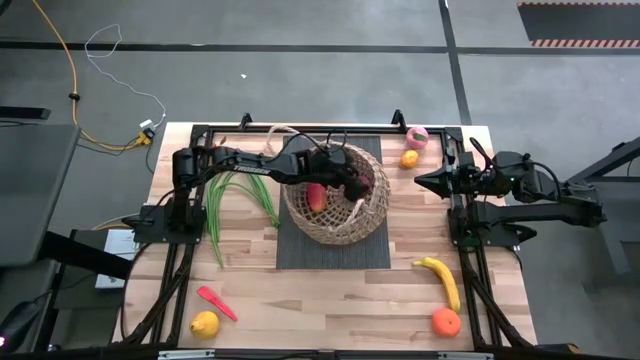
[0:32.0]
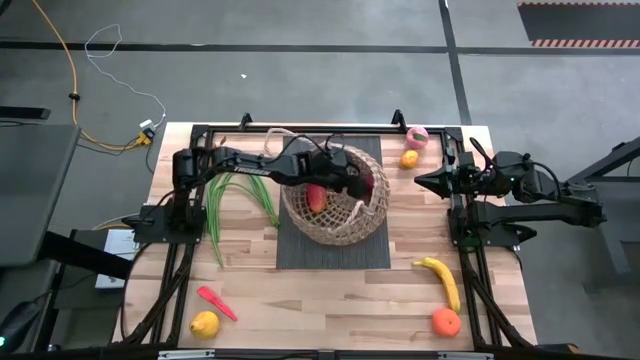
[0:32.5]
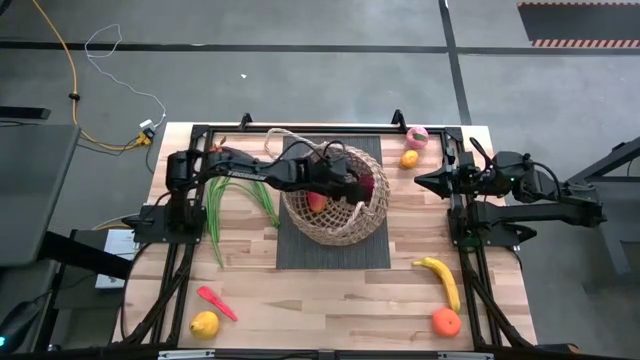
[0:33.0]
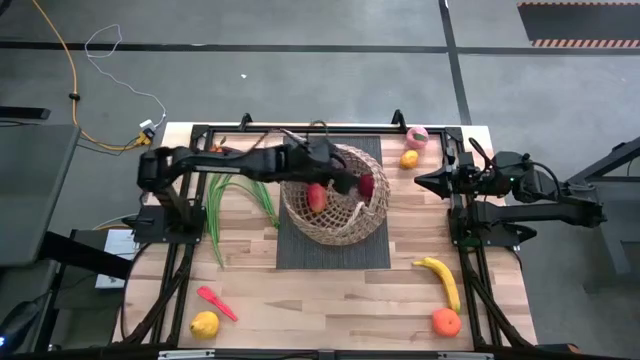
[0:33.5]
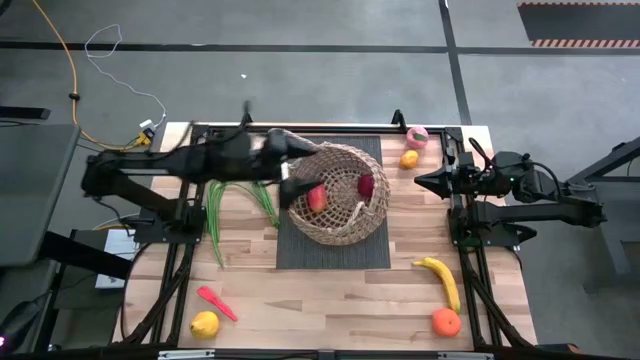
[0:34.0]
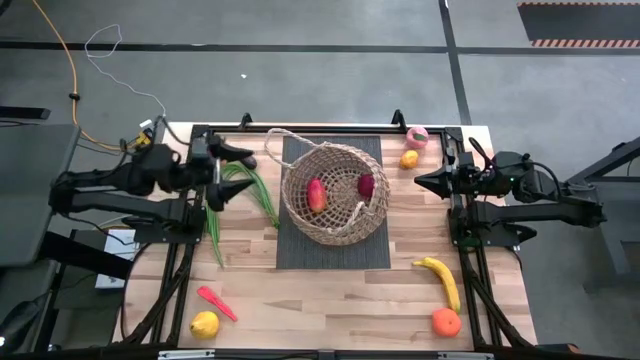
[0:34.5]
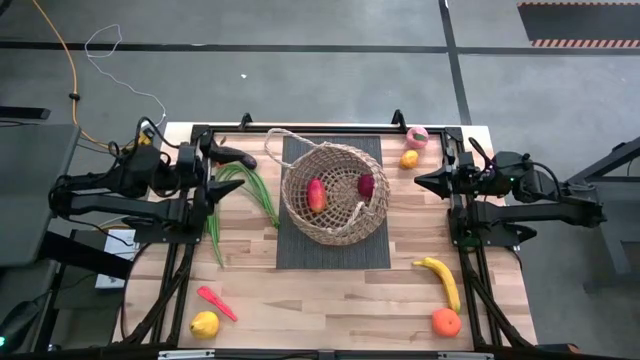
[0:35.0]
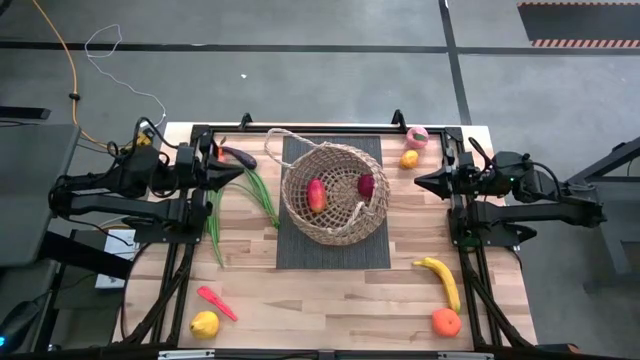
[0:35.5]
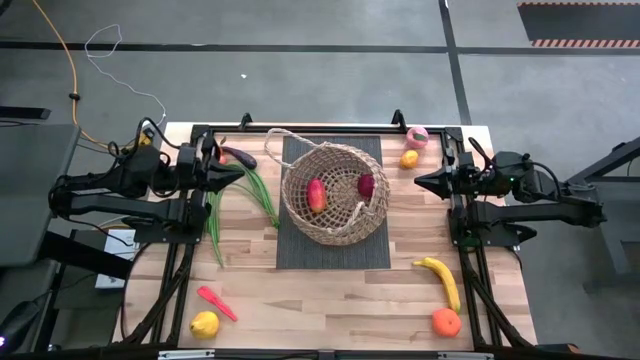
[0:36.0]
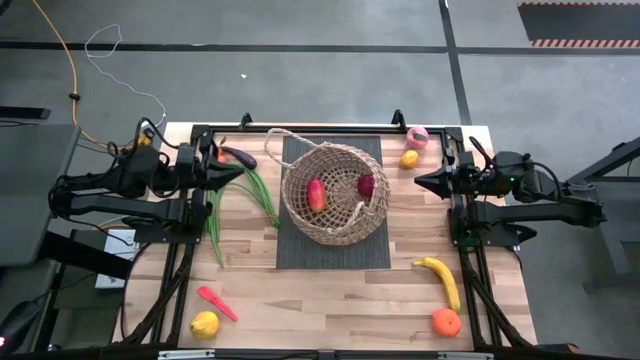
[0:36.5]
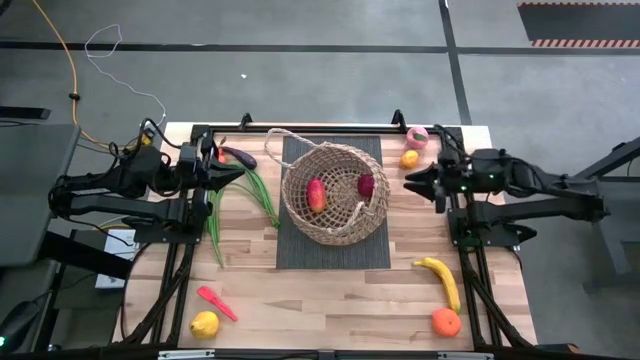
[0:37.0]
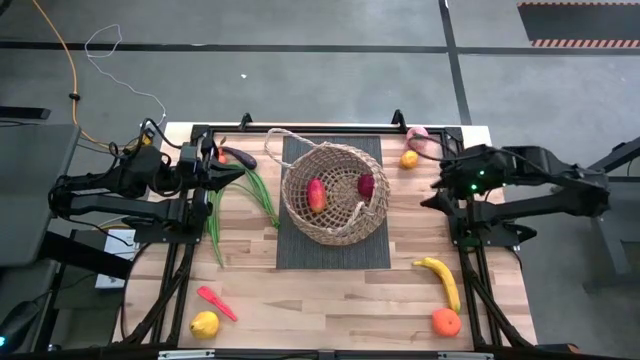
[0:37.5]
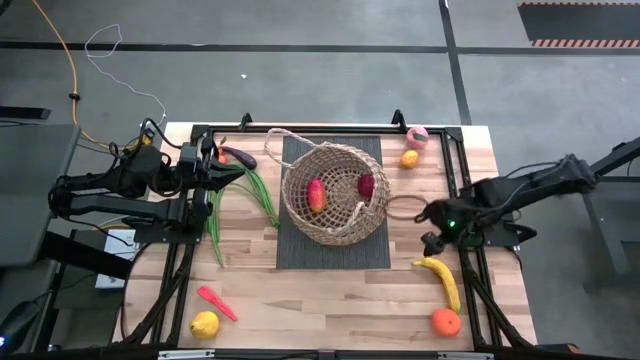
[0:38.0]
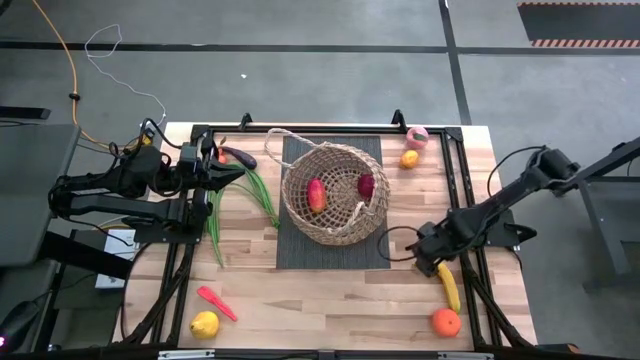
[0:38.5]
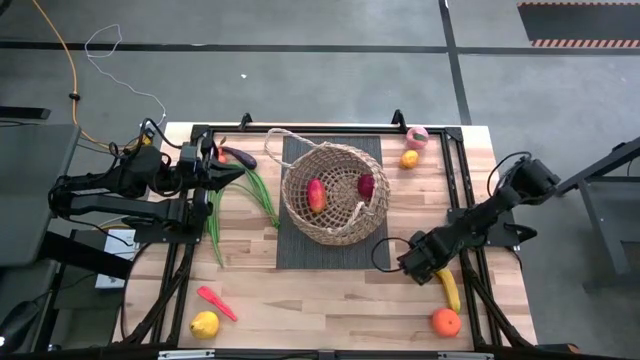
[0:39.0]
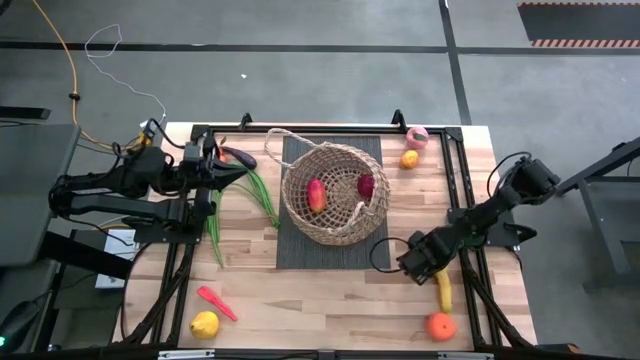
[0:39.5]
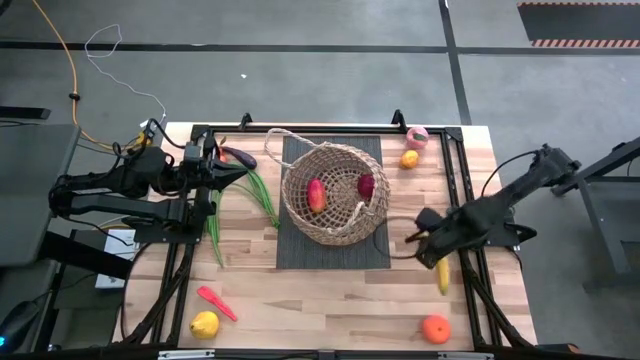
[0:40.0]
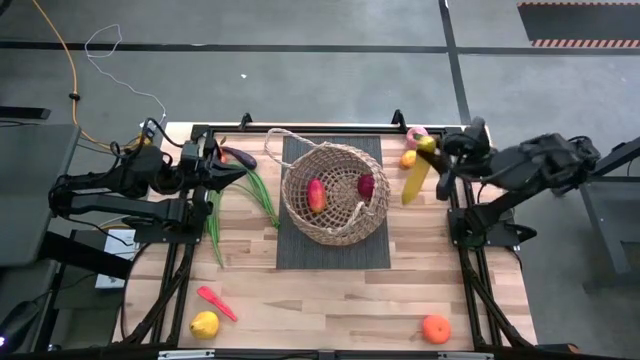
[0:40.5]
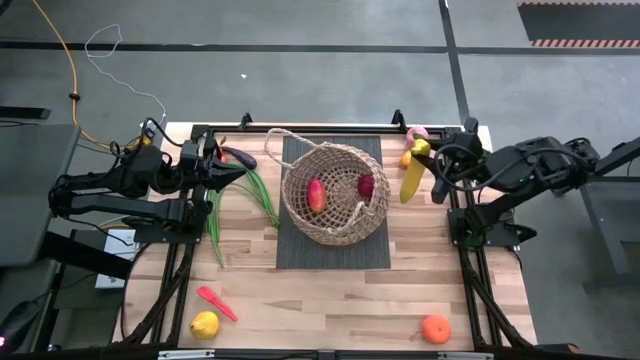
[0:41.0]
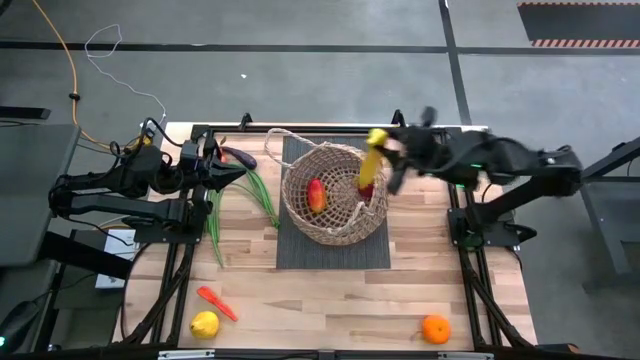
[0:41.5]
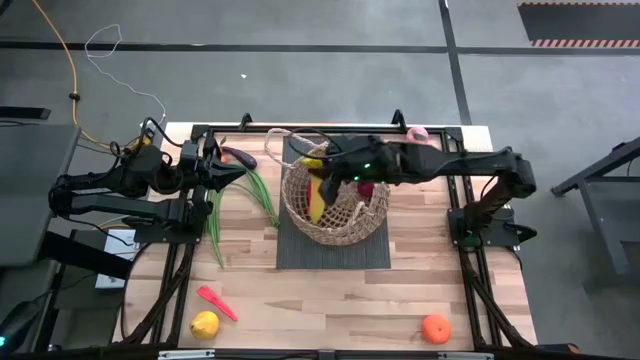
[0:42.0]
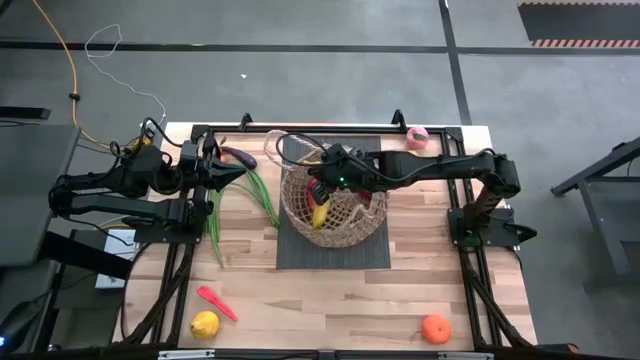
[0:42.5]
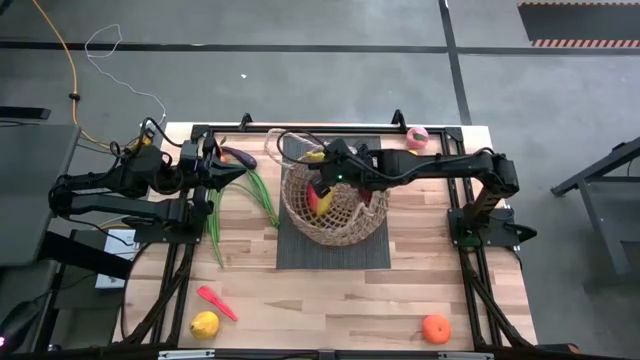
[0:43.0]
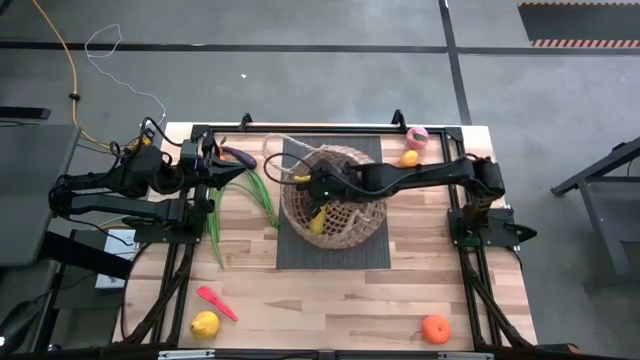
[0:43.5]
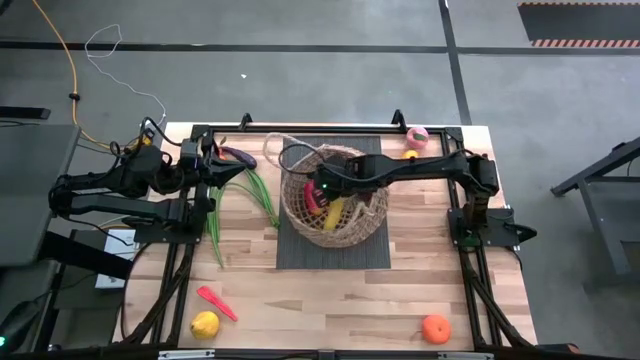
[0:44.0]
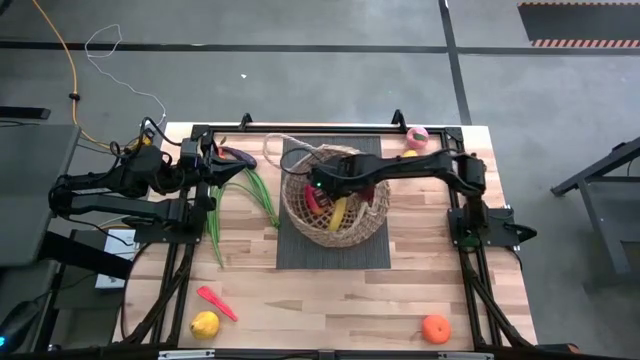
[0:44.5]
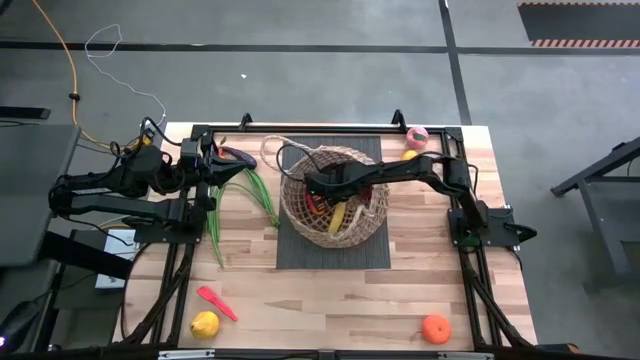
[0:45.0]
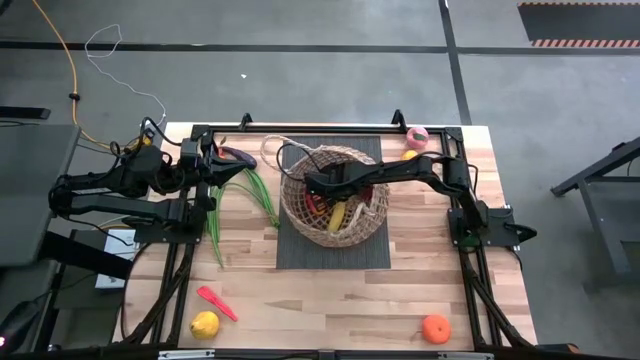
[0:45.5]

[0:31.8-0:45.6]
Task: Build produce basket
Put the banana into the woven basket

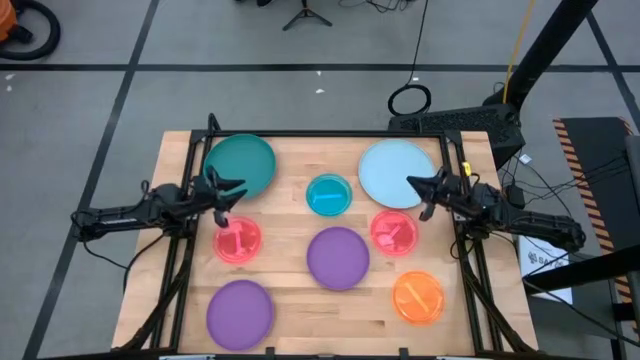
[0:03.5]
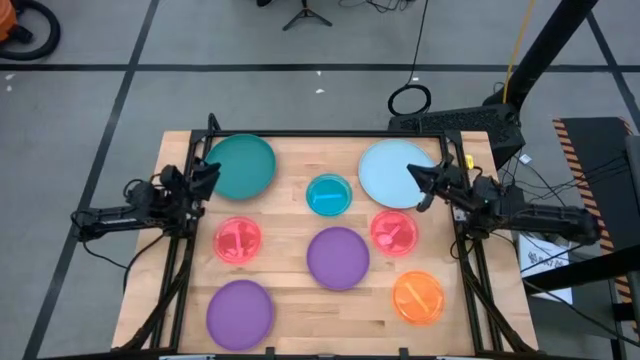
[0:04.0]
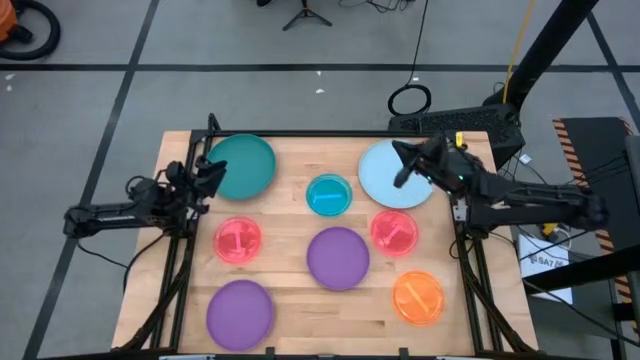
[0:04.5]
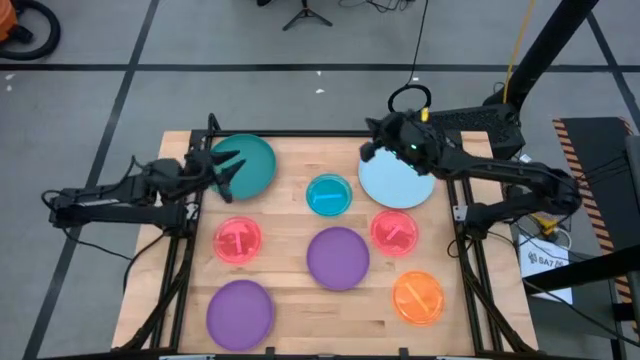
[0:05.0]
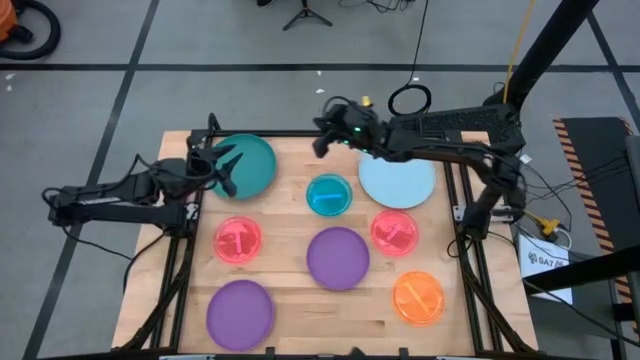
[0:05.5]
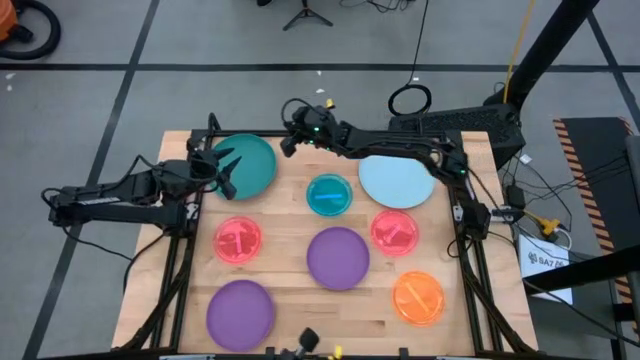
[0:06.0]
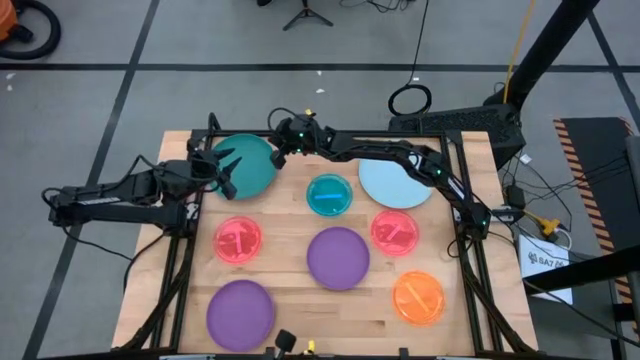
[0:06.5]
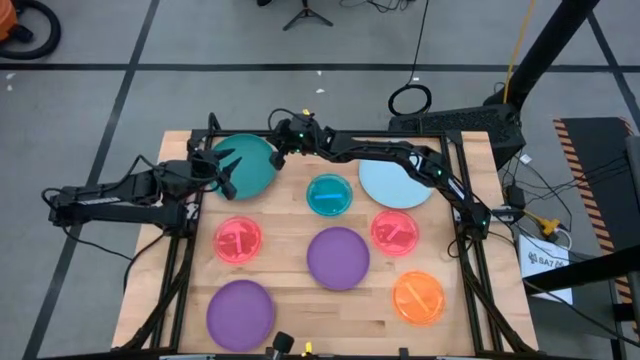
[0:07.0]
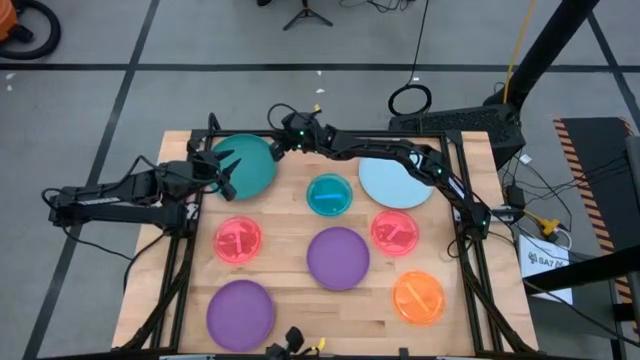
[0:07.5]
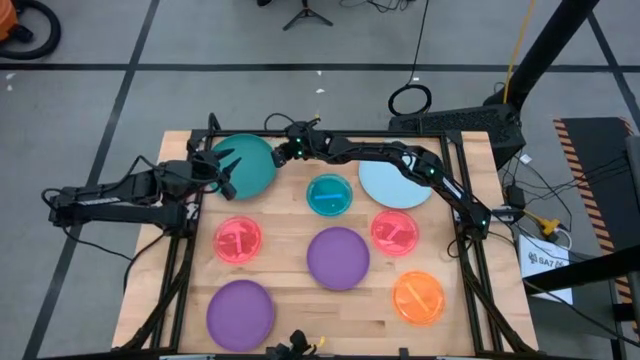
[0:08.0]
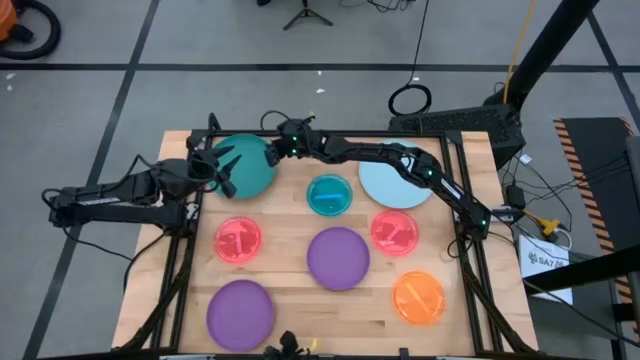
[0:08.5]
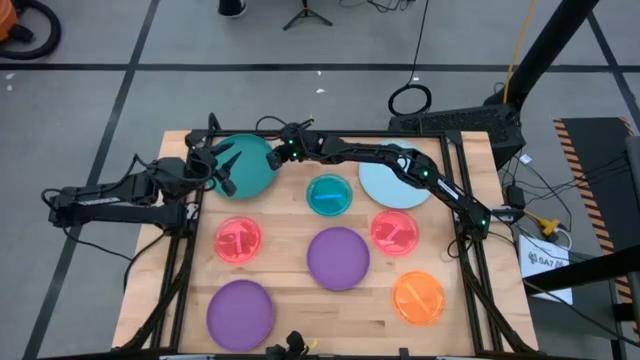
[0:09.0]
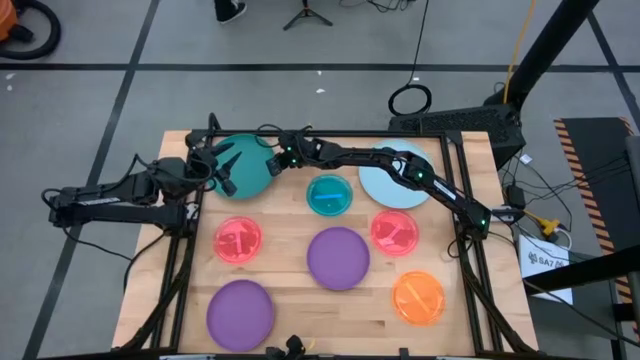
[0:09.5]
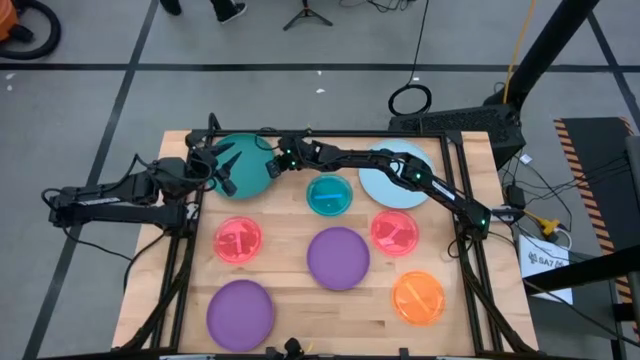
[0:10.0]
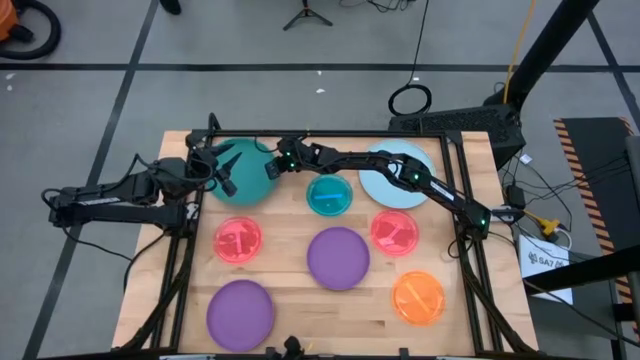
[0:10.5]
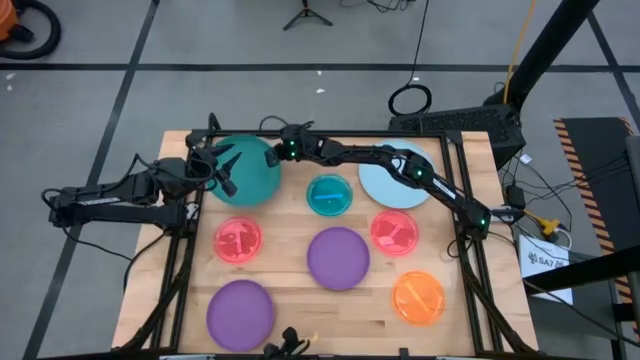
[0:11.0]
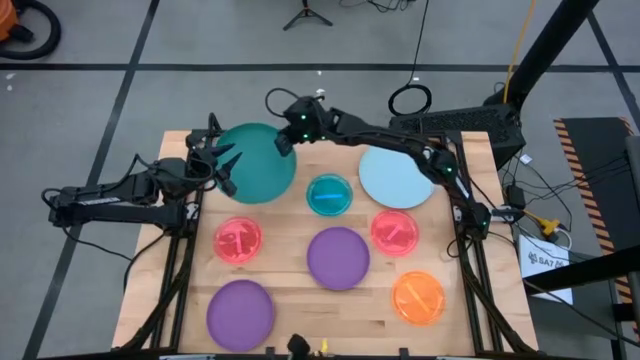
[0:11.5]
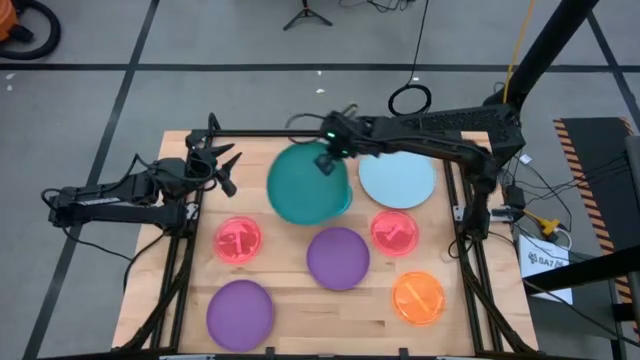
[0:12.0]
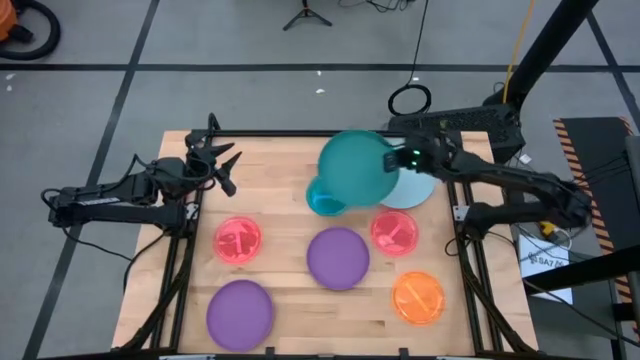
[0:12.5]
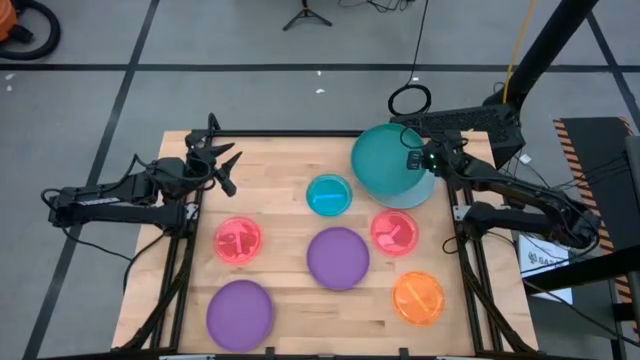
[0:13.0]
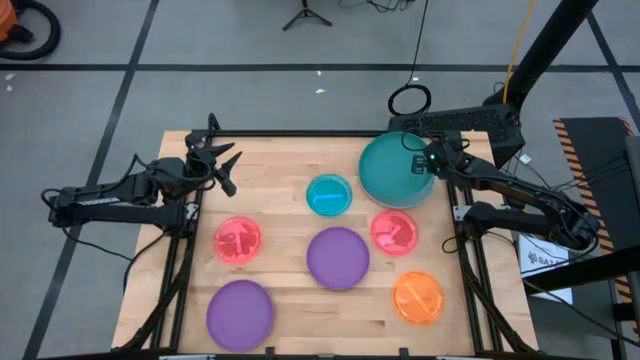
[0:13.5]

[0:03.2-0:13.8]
Task: Stack plastic plates
Stack the green plate on top of the light blue plate
